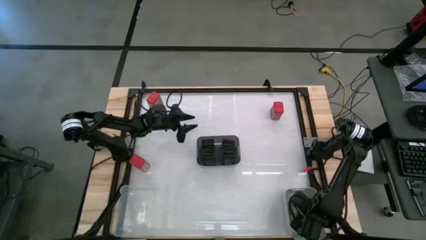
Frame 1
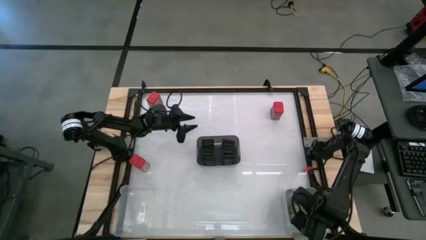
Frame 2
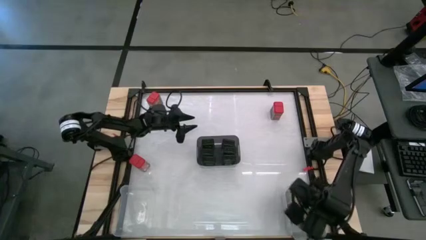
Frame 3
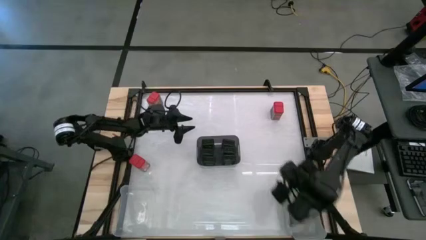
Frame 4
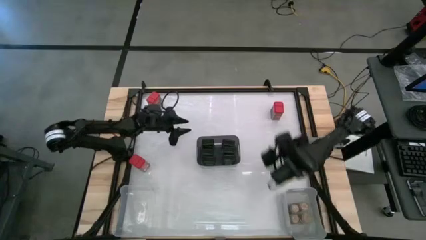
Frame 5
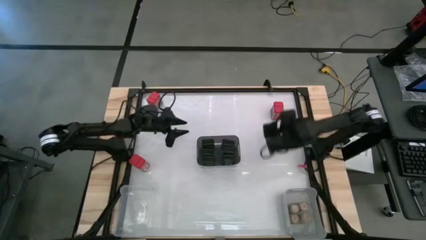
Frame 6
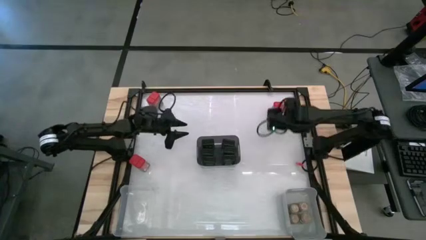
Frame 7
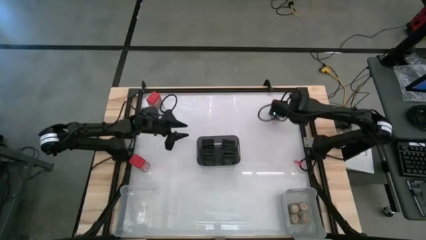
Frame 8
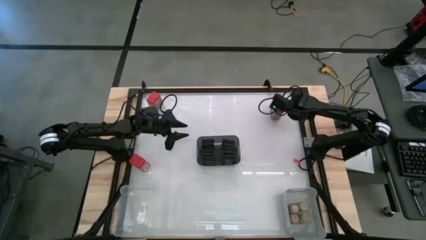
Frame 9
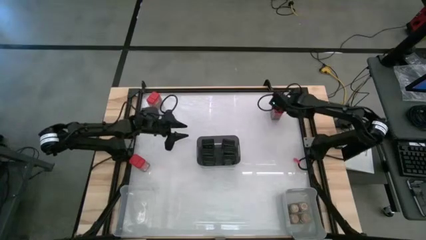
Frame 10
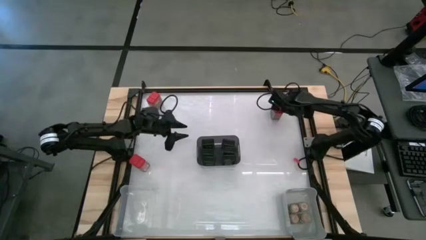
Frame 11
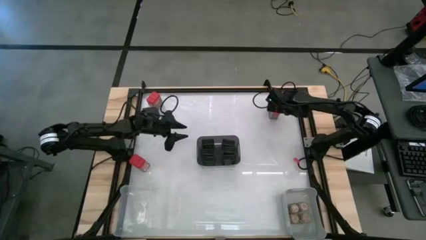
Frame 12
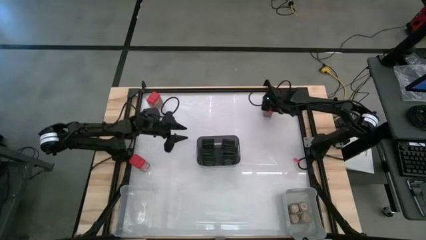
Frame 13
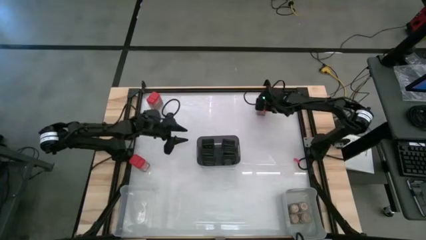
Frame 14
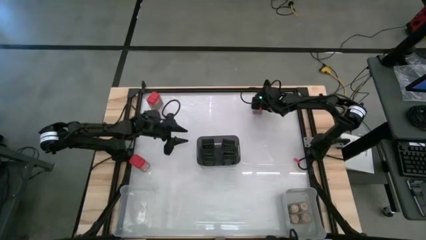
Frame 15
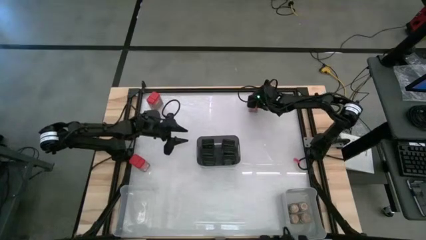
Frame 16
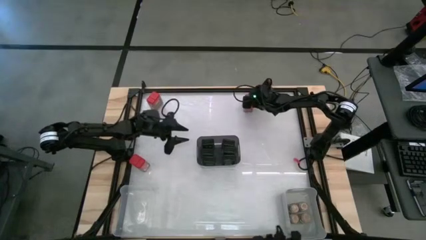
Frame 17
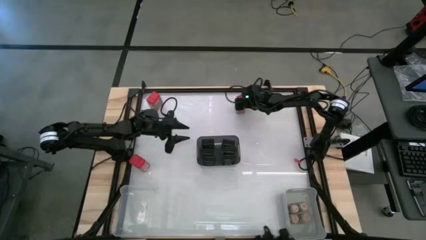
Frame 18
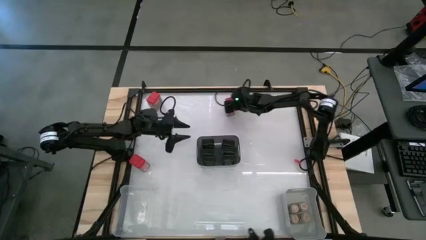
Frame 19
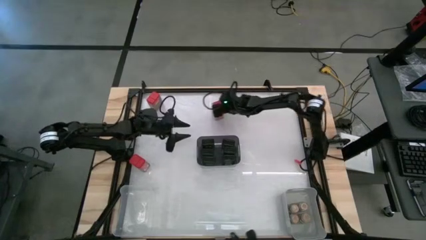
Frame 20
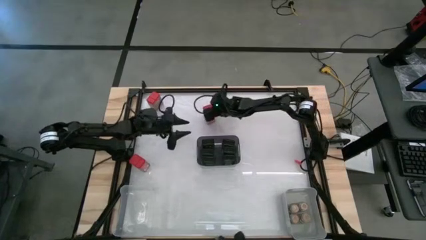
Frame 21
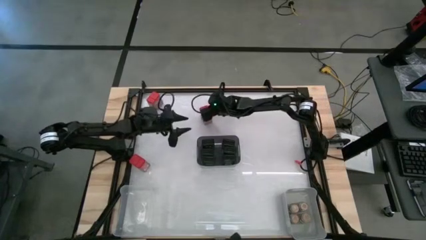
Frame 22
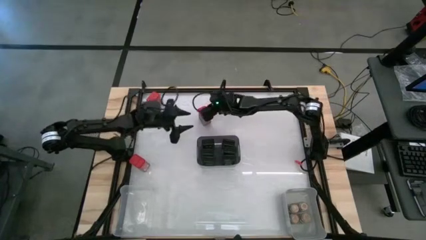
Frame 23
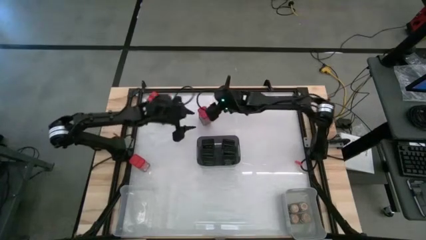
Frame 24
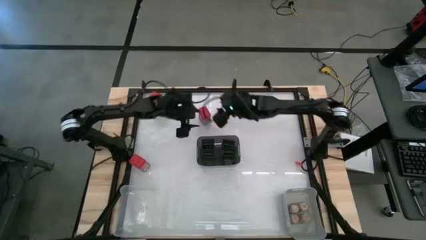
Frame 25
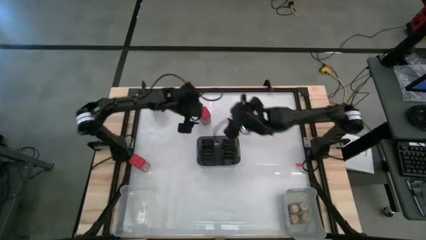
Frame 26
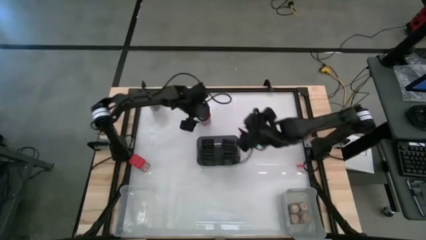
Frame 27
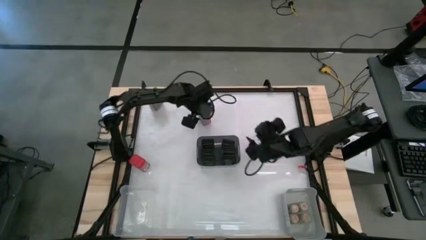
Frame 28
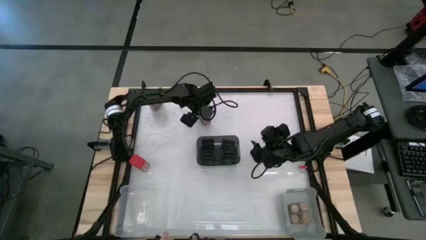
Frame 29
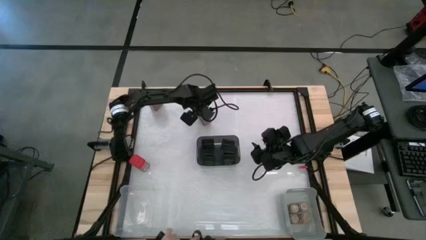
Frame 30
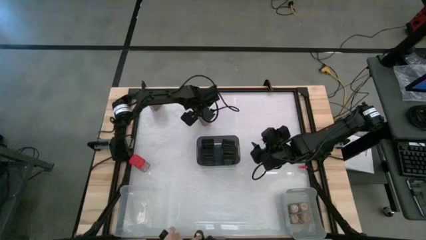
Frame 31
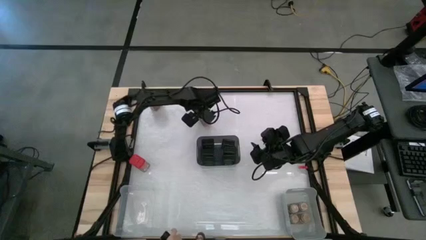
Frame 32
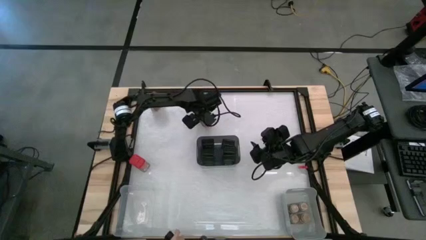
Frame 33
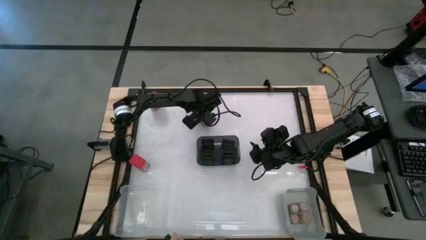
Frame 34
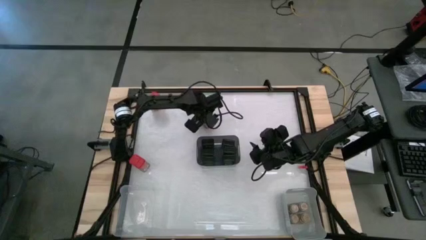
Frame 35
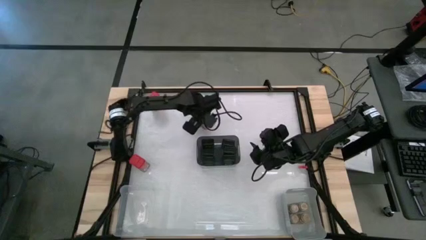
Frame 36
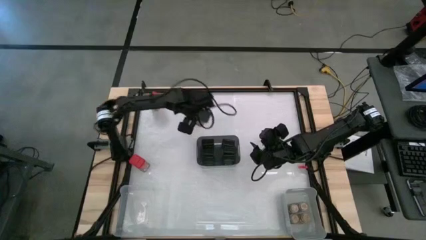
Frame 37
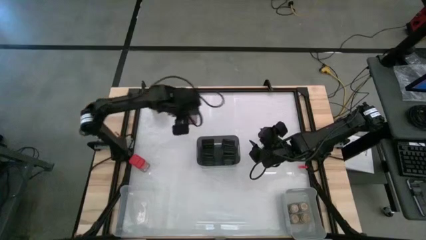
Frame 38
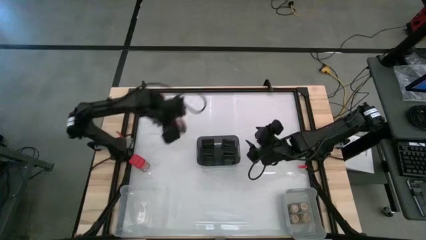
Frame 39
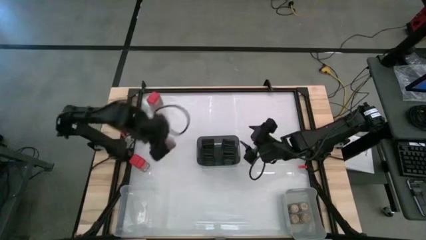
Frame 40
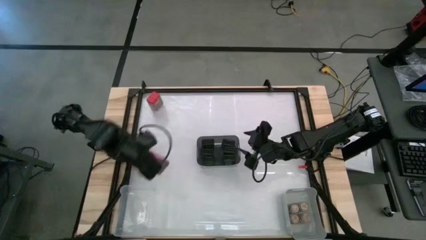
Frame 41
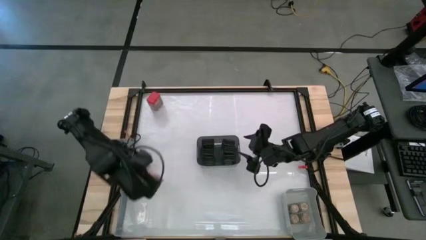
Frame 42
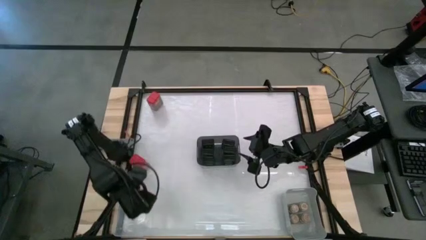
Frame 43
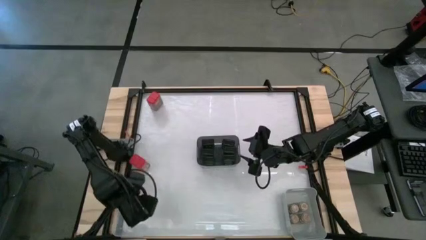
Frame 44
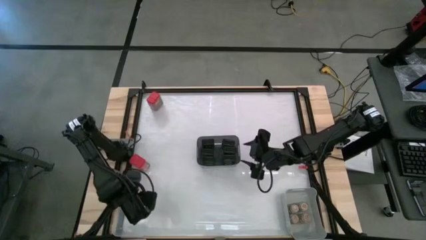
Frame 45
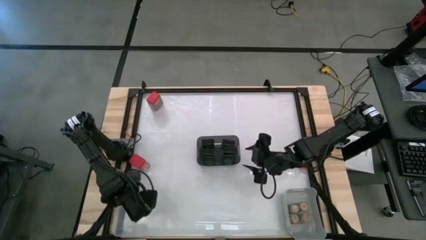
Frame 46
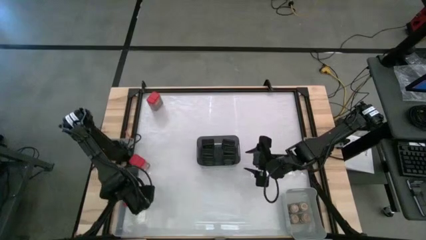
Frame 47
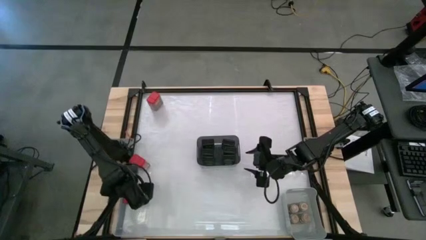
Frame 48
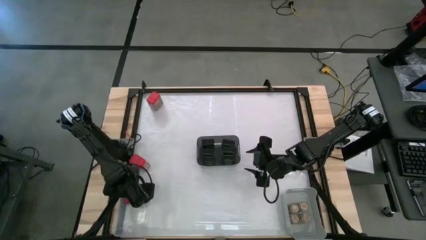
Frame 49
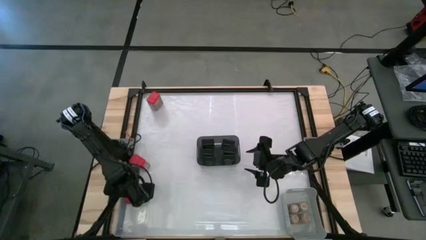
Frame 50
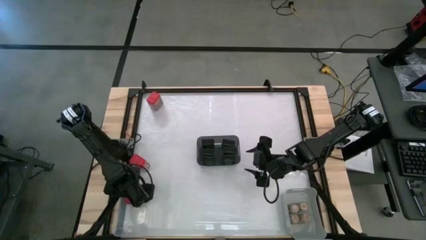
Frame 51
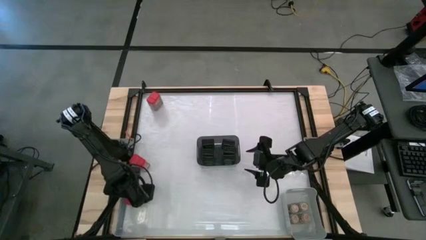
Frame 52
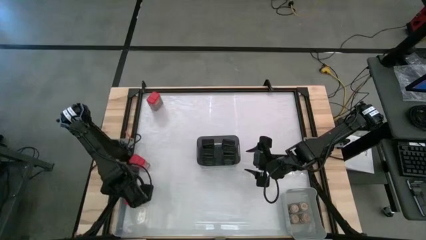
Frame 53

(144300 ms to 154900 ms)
Task: Sort spices by type
Put the red seasoning can into the transparent bin

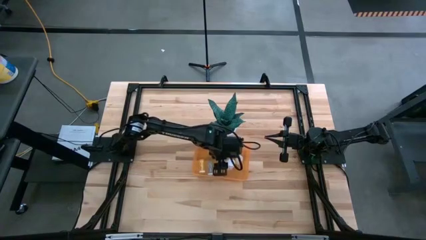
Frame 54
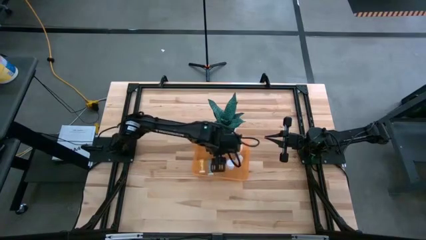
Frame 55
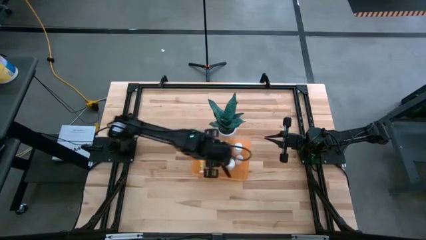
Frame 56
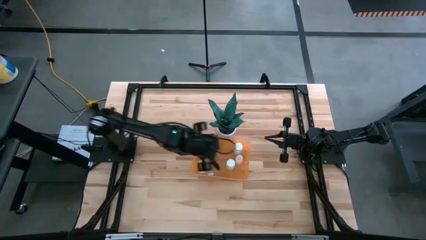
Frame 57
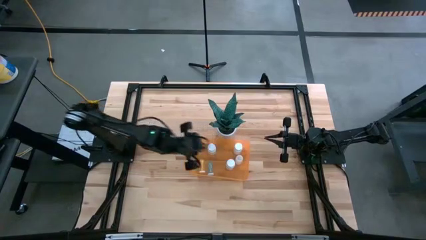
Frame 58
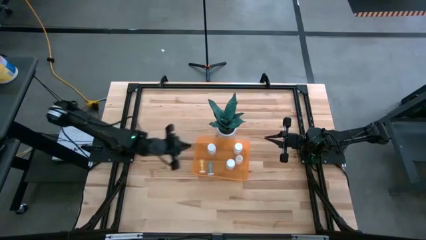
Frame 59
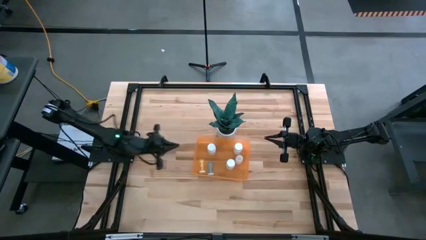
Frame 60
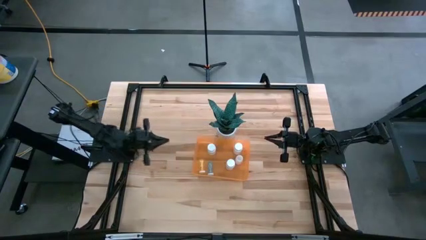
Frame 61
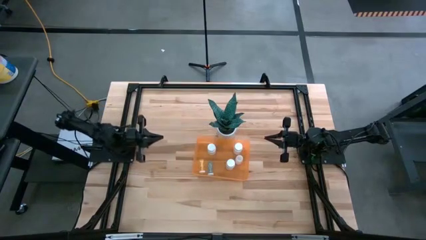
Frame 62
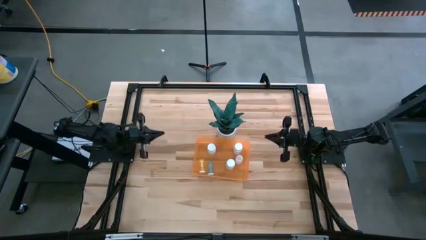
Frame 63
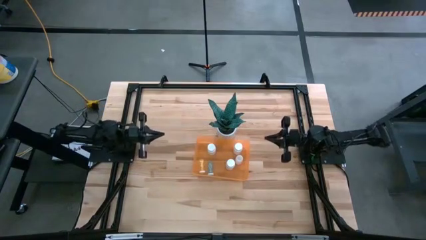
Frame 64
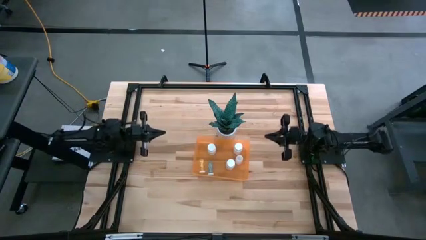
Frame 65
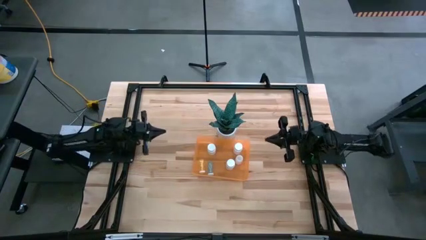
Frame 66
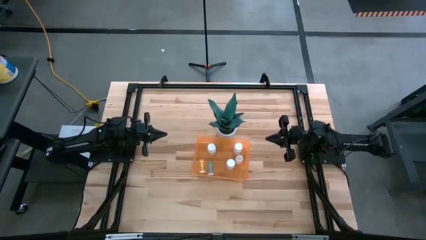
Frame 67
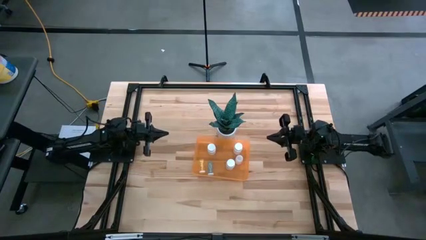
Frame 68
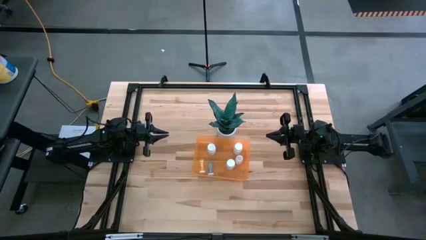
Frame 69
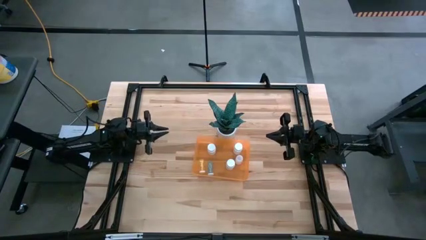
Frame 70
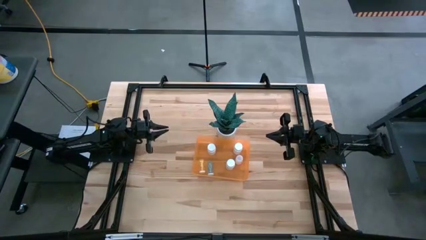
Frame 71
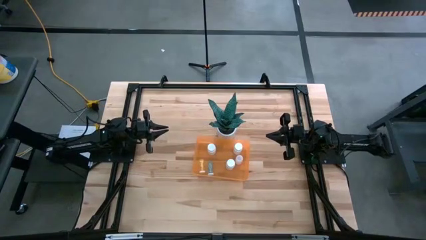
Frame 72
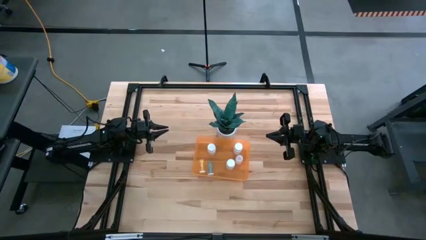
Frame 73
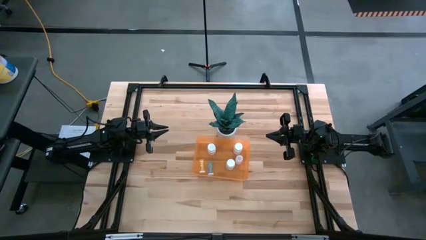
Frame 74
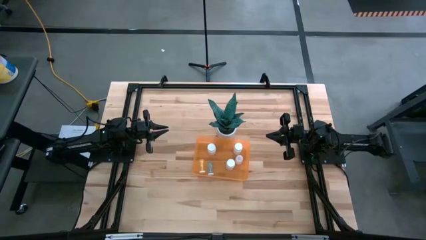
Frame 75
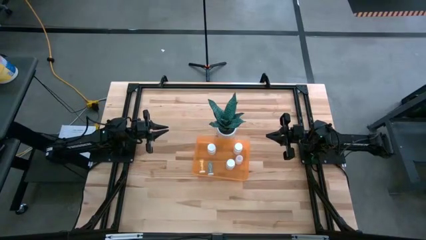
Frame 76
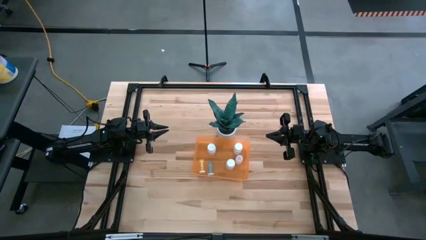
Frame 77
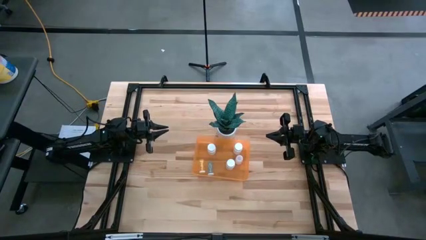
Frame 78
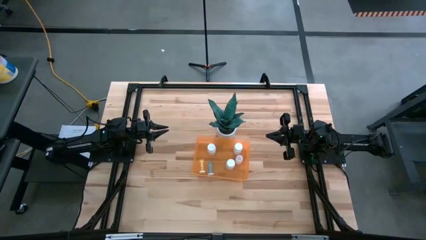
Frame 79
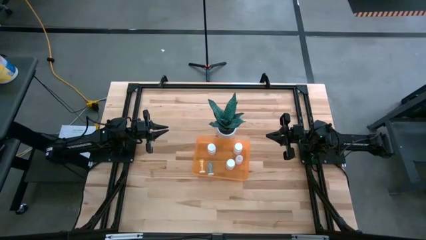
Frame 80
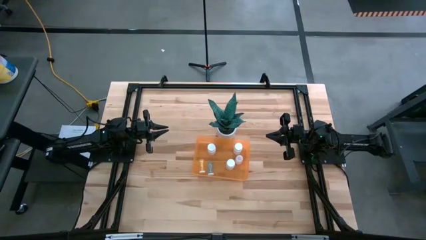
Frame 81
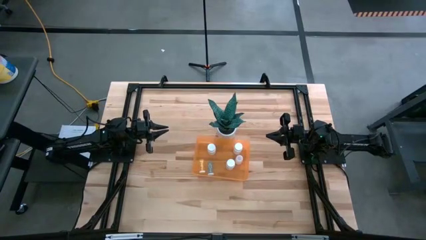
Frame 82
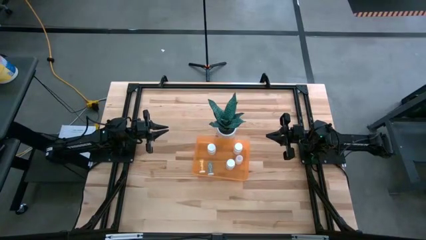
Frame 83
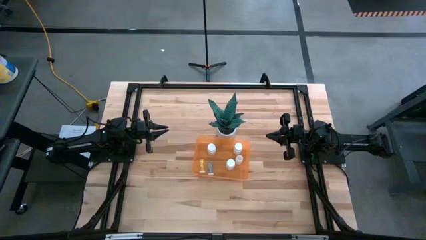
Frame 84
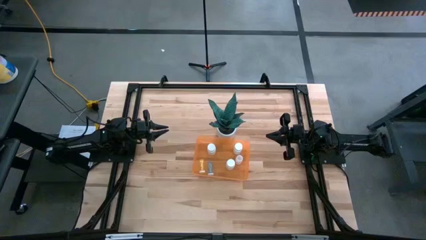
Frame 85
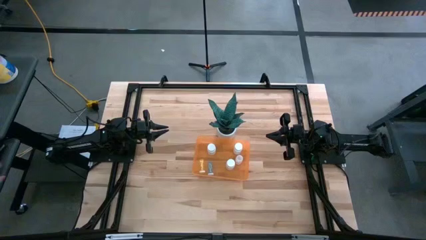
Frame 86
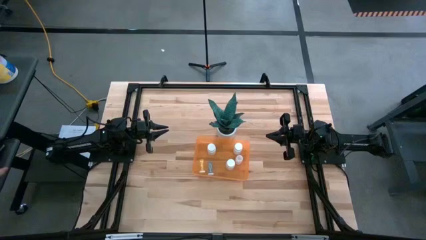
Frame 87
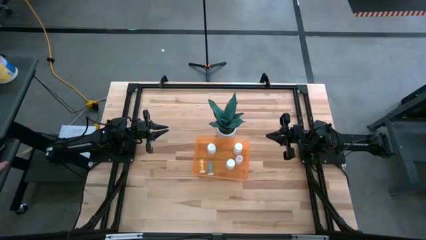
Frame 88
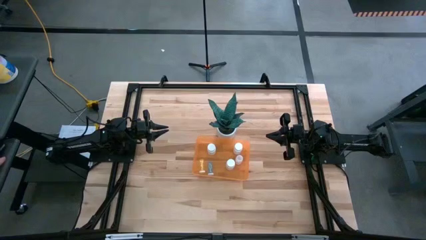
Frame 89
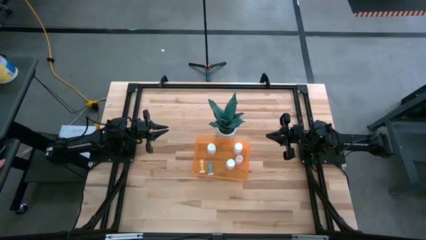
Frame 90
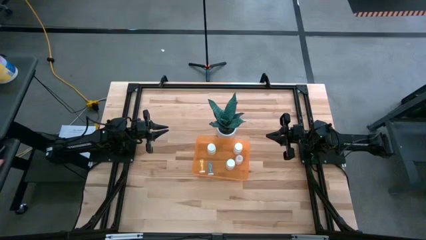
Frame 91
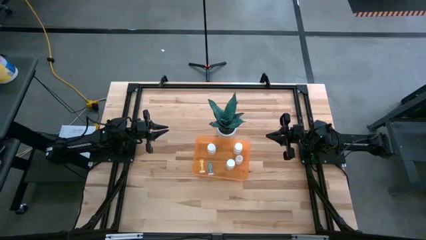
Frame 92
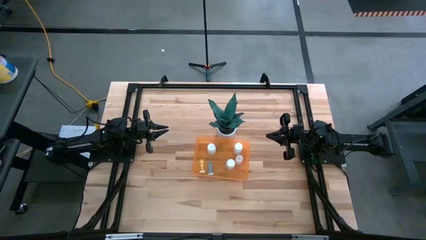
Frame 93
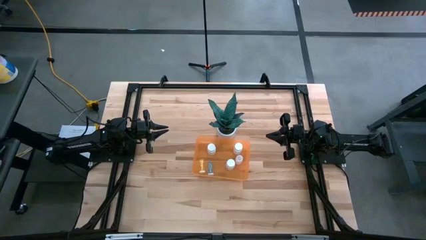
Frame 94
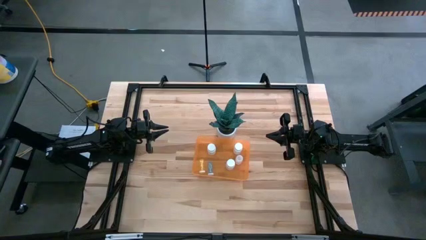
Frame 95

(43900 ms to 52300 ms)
Task: Pick and place pill bottles into a basket
Return to Home Position
